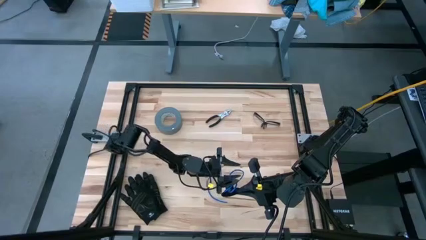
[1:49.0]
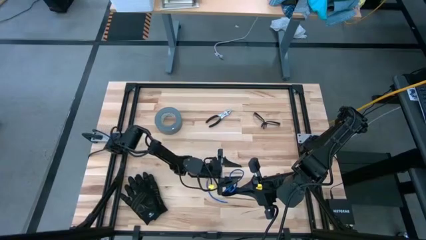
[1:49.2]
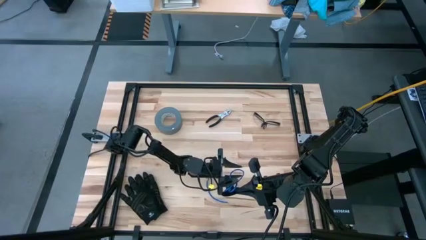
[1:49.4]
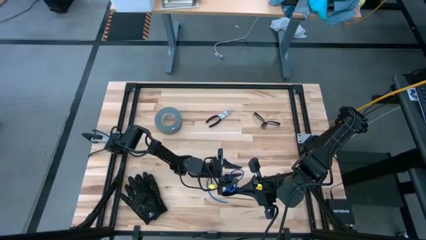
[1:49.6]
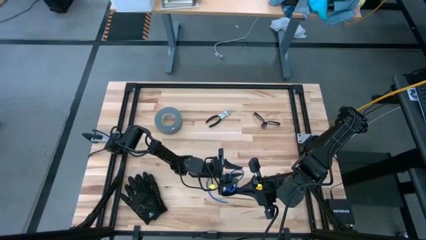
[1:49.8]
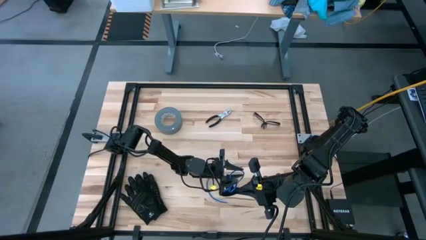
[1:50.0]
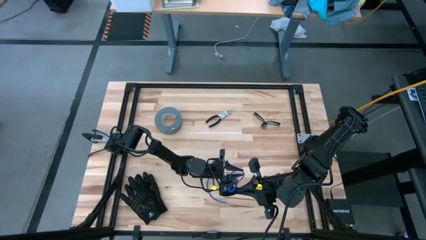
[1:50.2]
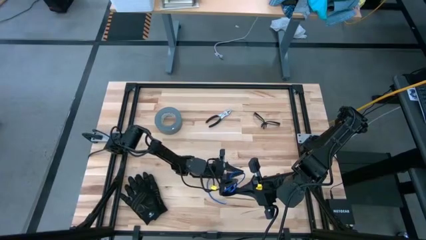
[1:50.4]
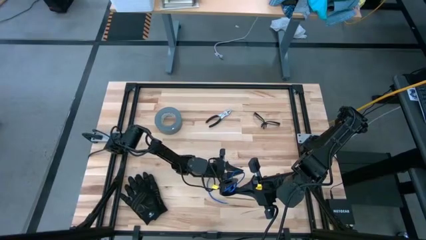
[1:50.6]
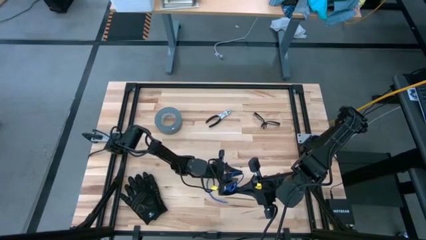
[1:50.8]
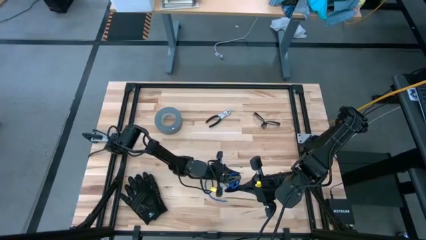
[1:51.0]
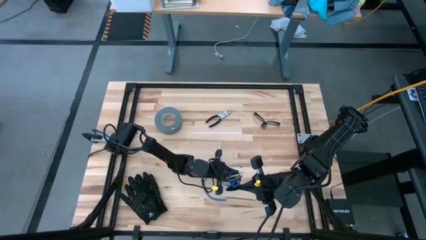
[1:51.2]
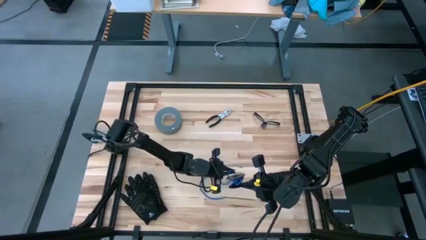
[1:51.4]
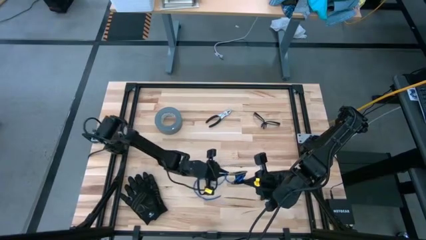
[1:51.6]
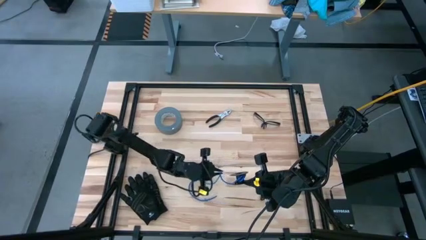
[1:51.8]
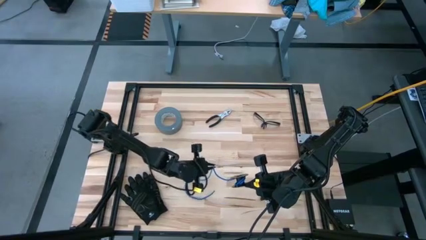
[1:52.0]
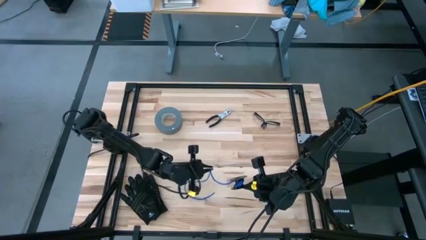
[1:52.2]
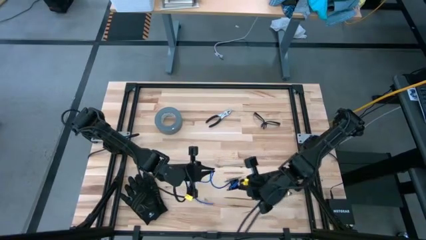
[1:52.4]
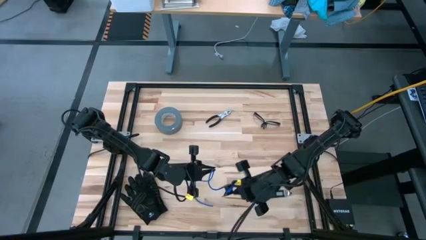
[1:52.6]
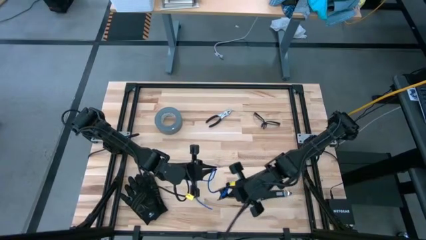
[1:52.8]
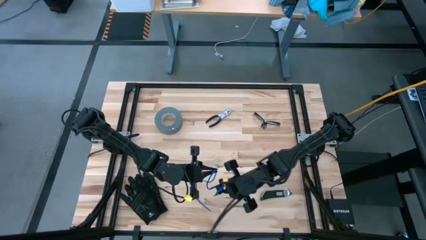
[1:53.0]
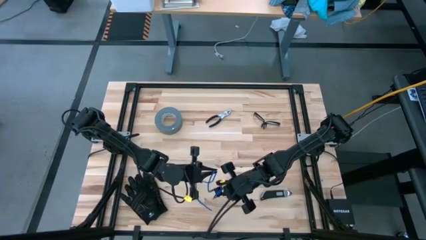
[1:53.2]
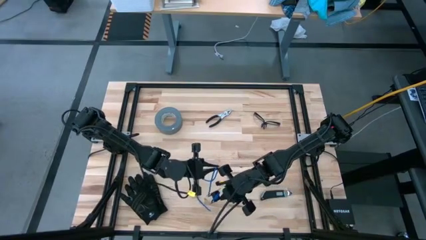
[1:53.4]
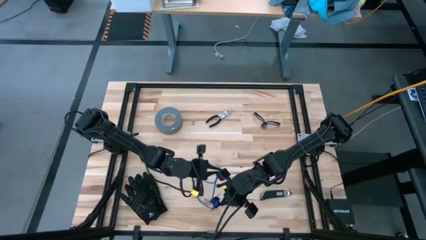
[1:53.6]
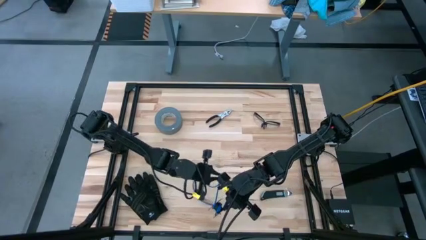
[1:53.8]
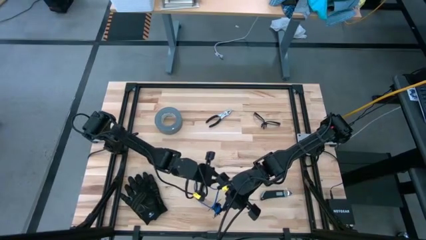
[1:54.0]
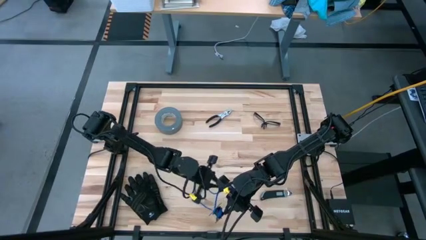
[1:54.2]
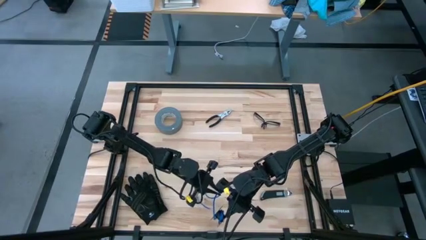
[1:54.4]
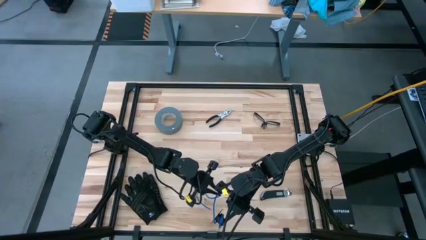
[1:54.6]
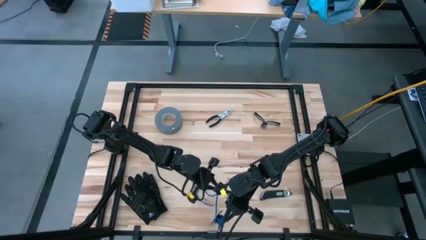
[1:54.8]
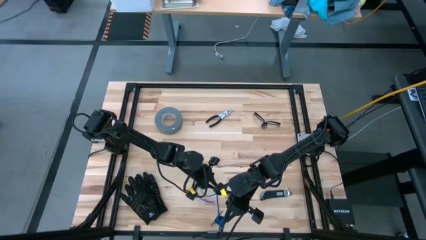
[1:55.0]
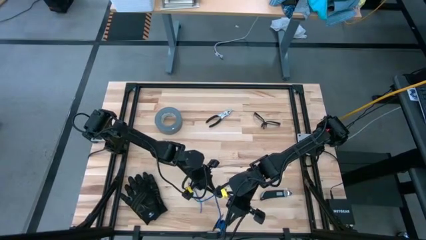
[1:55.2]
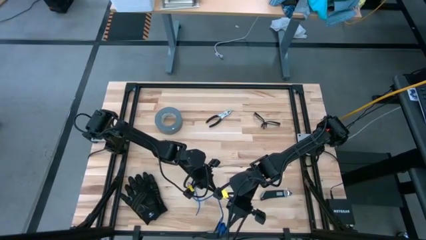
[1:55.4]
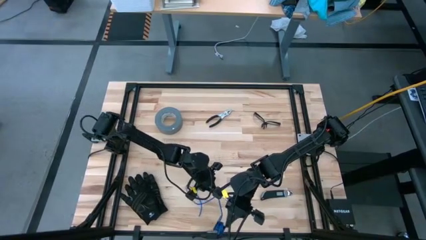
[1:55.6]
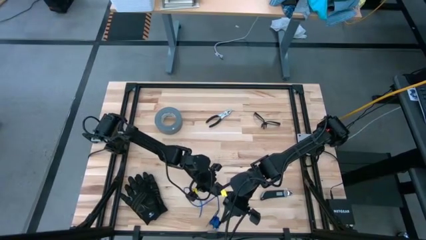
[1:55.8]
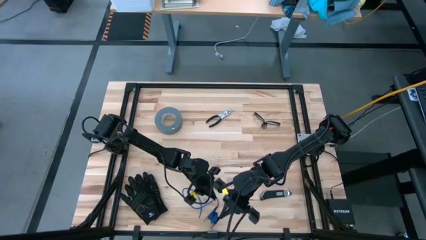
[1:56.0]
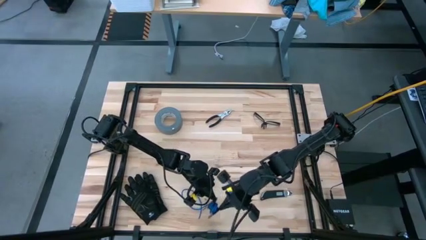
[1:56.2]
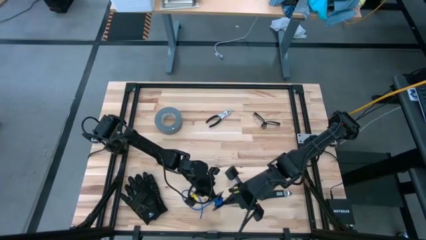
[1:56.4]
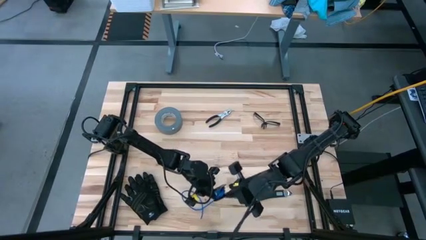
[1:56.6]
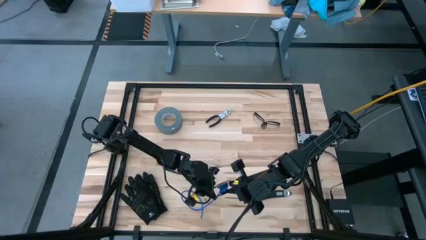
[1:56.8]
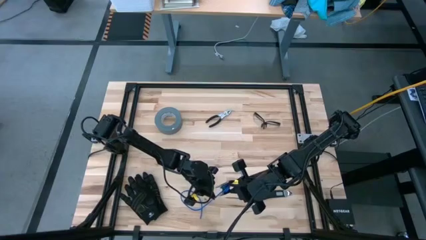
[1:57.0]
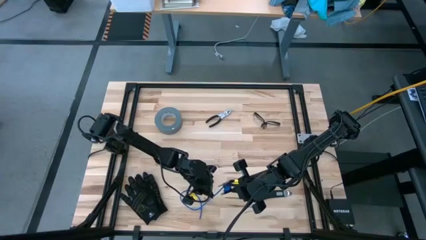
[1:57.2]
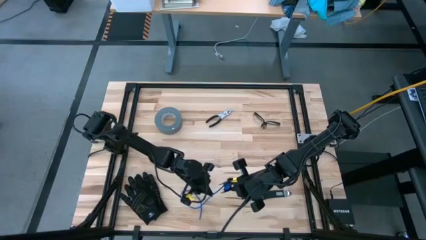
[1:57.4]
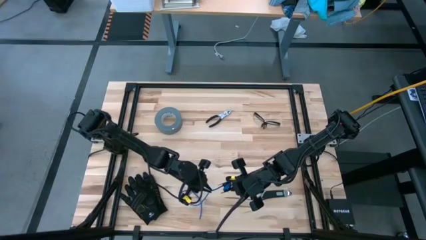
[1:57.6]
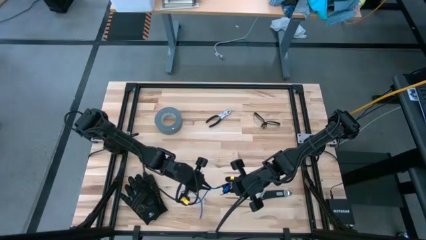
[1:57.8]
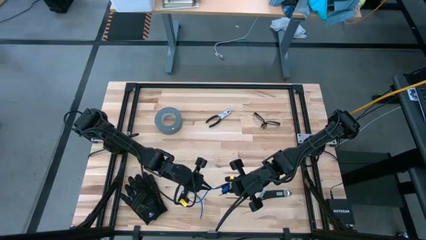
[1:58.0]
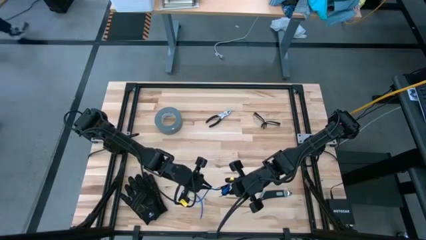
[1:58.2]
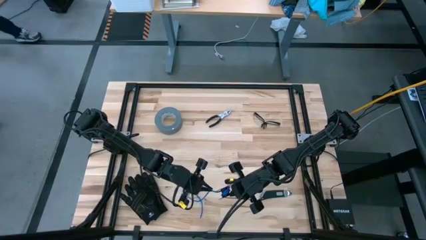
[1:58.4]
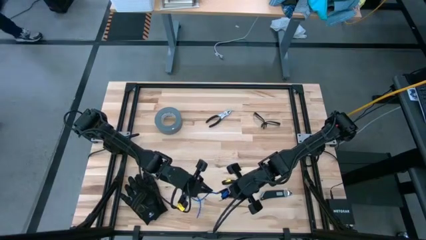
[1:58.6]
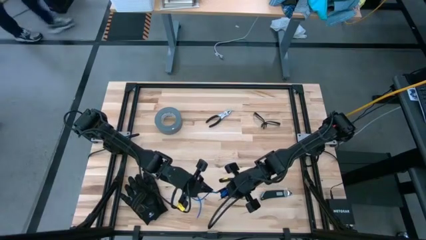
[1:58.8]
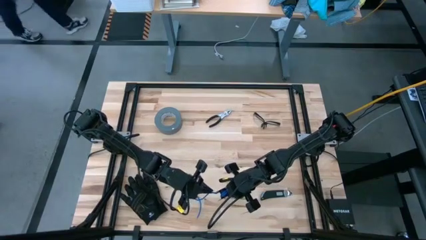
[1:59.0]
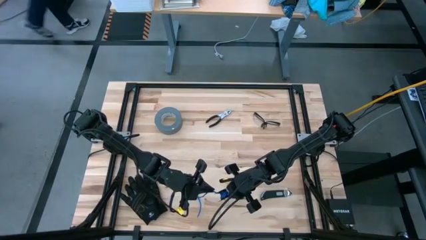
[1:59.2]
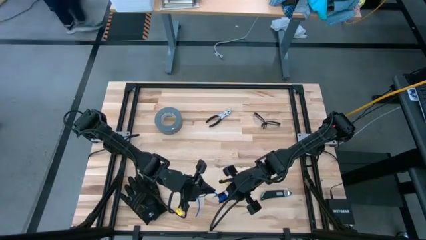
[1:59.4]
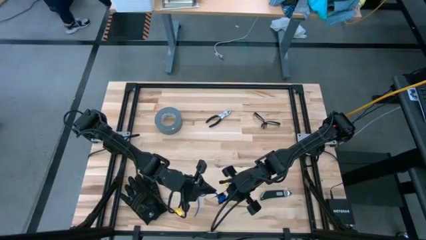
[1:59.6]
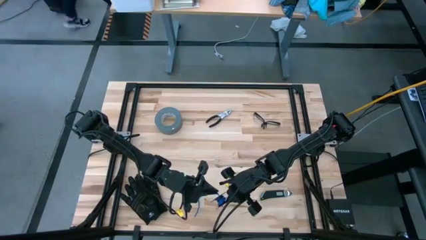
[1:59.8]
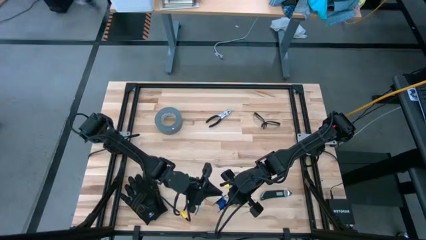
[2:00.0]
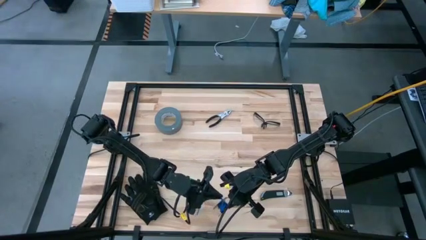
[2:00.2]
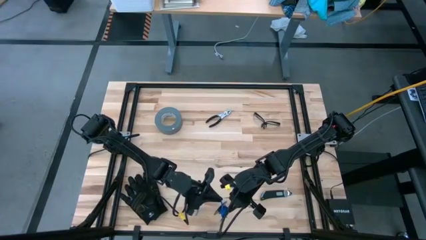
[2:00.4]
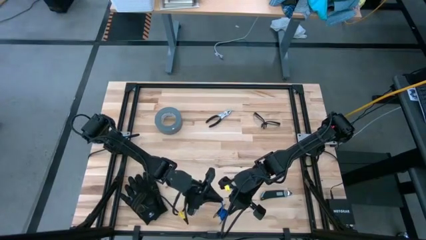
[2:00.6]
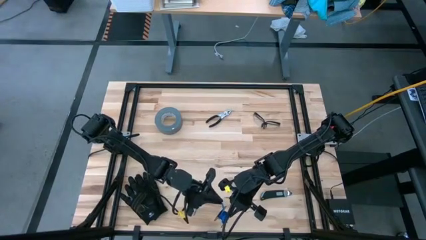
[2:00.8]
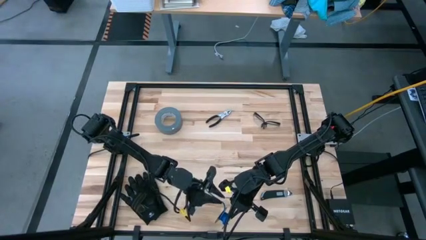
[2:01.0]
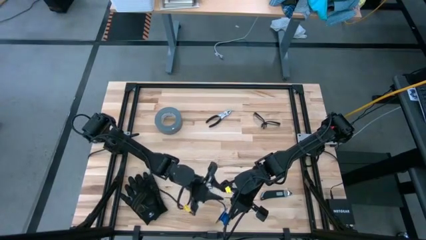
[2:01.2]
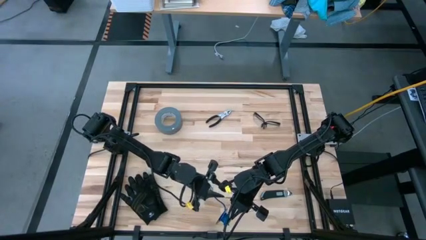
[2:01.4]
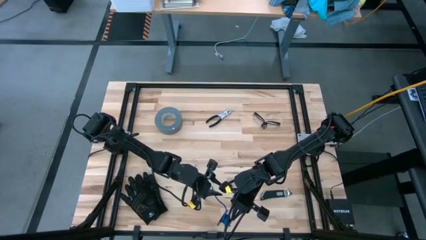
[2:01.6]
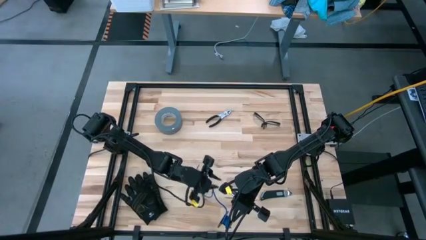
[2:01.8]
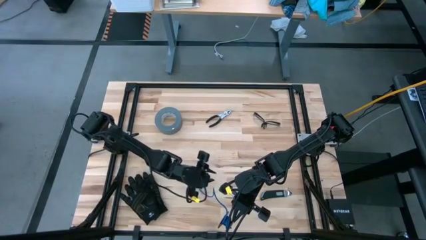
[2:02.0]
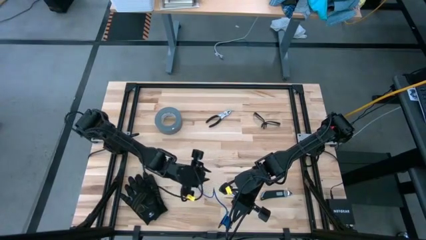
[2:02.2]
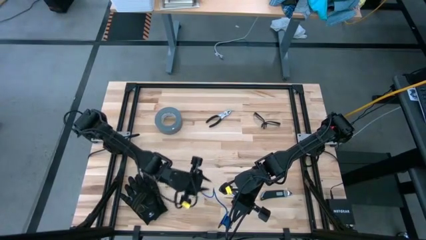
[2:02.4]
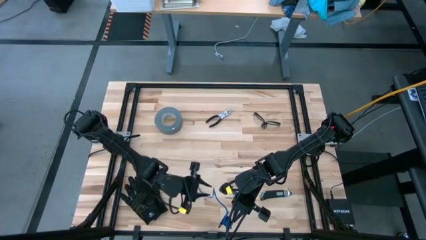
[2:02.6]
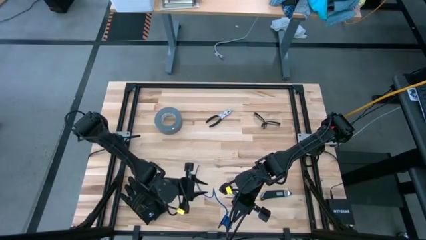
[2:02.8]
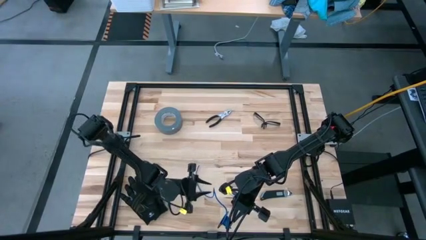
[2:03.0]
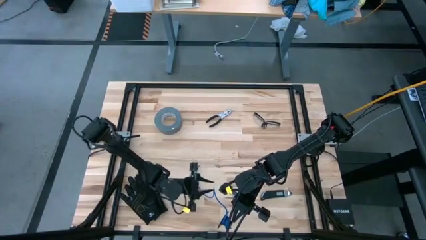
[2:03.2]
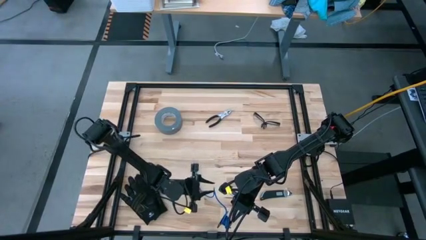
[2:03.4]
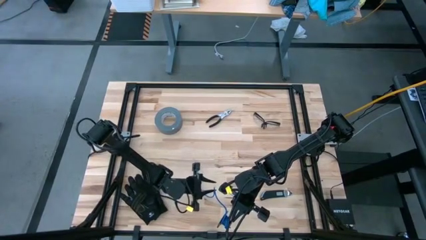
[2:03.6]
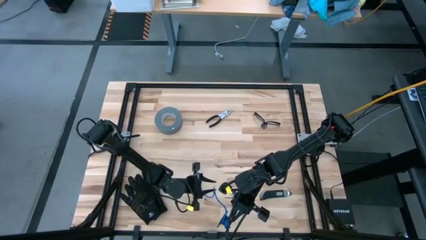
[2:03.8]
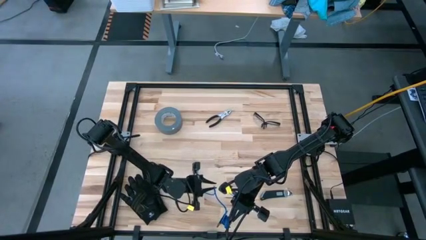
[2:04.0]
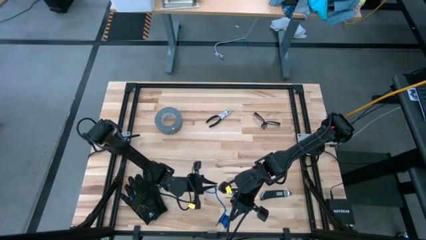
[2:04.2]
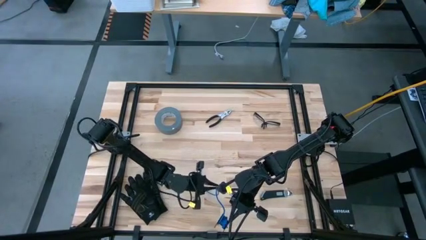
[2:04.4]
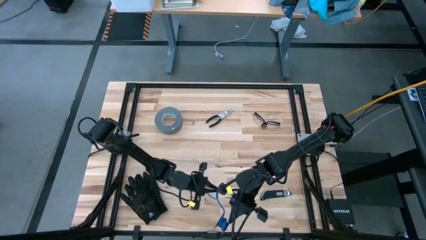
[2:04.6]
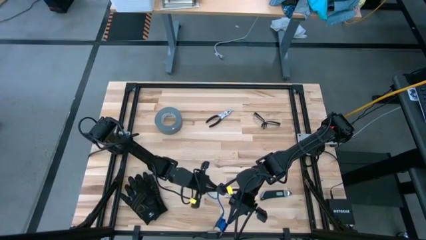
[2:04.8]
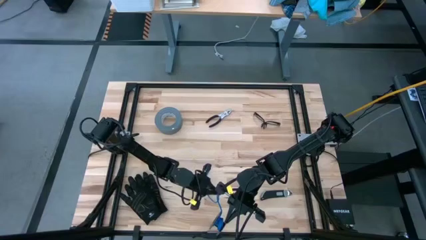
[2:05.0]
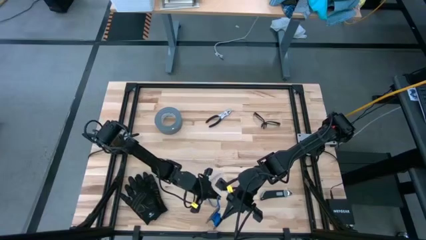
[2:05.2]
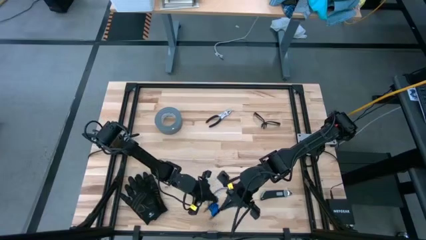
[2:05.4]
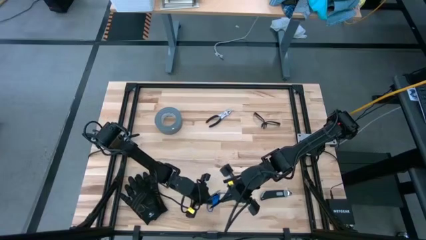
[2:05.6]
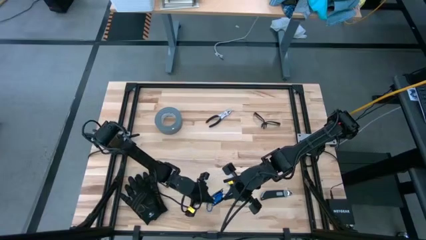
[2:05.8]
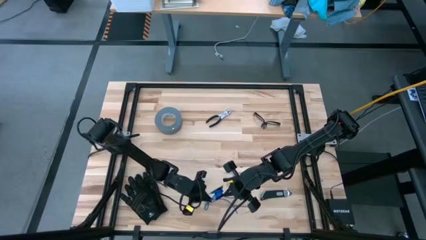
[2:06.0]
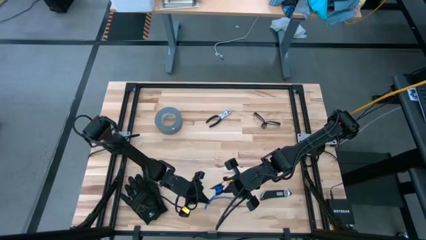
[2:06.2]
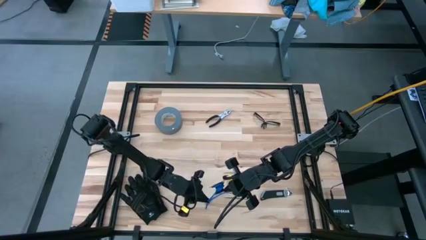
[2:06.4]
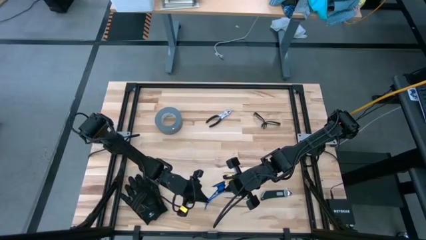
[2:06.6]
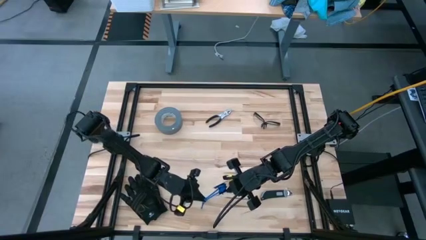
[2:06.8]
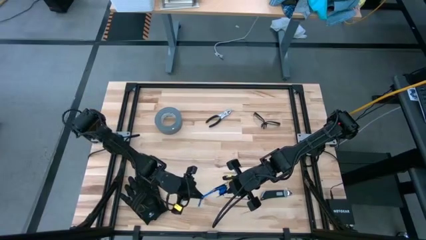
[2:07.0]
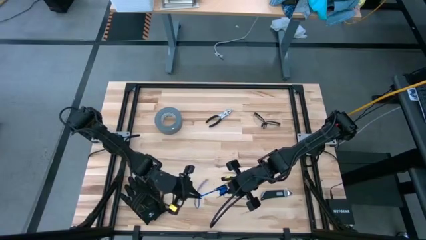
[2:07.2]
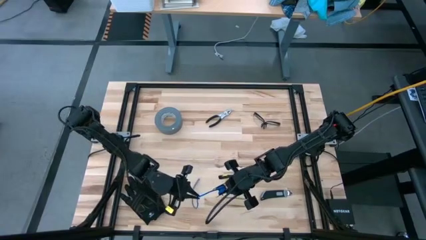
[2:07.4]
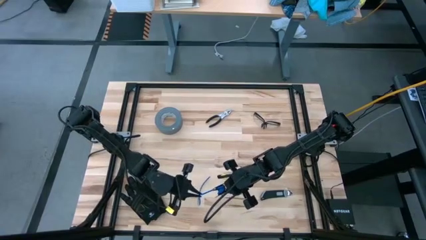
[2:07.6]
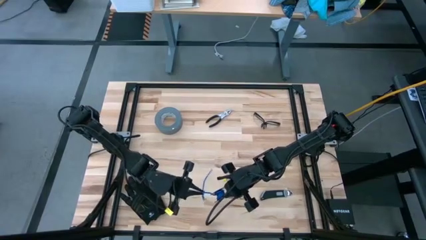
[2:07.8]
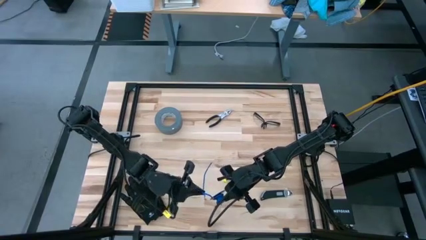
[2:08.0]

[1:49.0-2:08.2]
Task: Coil cords
Coil the blue wire cable onto the black spool
